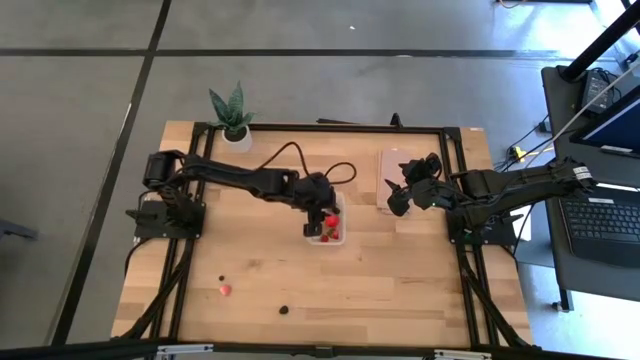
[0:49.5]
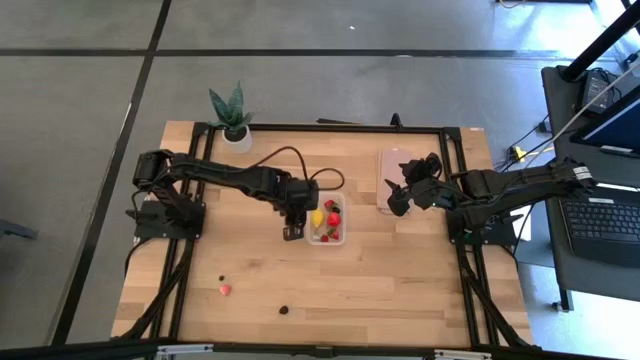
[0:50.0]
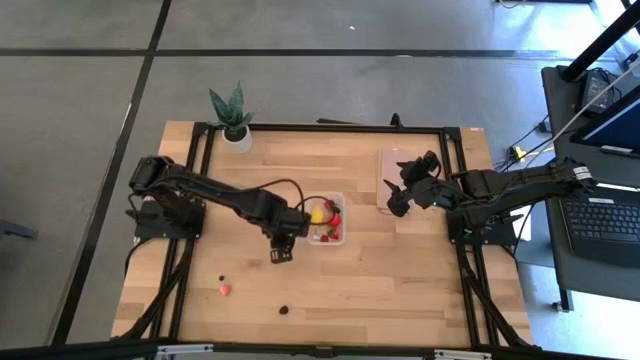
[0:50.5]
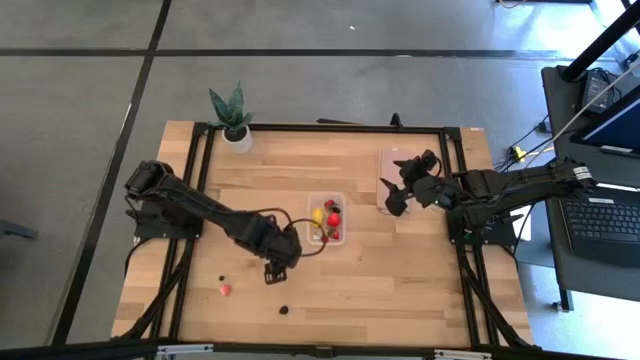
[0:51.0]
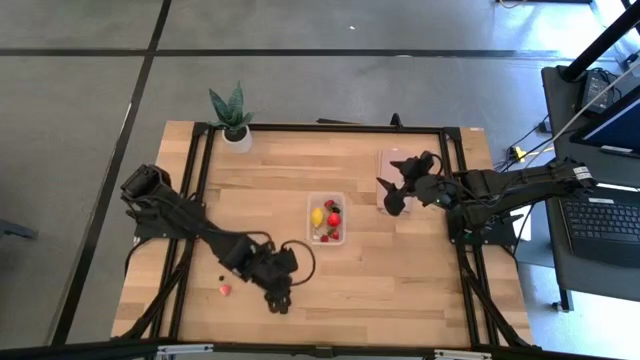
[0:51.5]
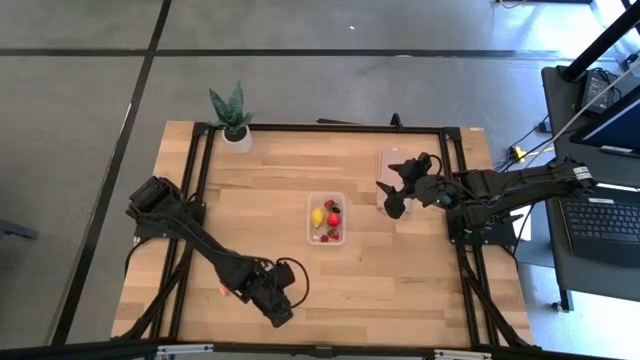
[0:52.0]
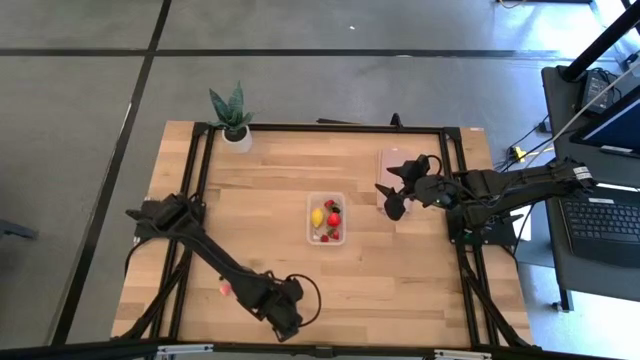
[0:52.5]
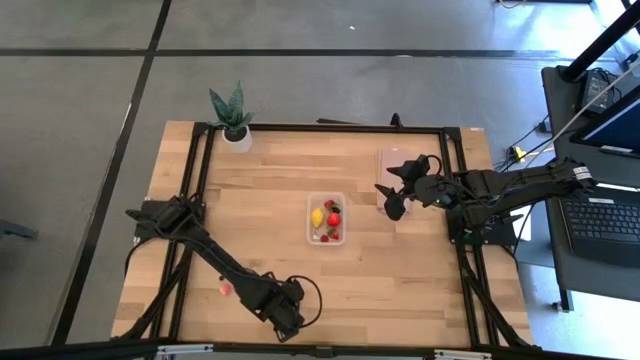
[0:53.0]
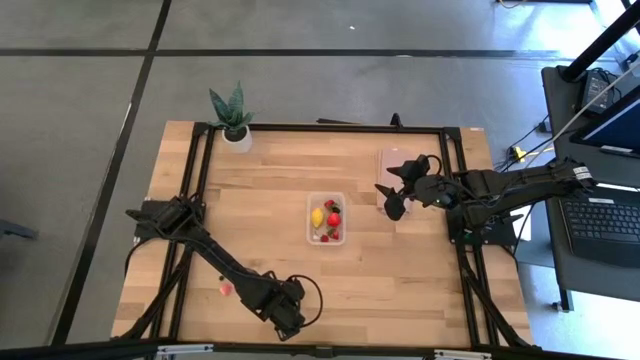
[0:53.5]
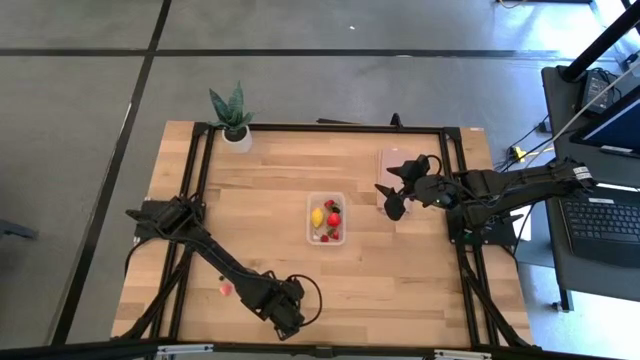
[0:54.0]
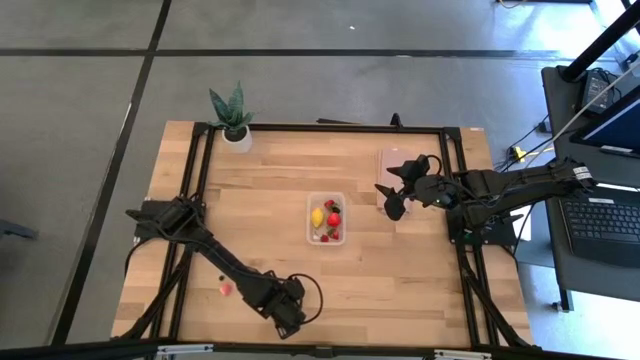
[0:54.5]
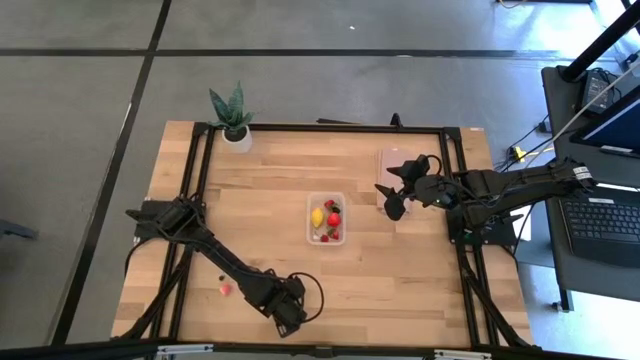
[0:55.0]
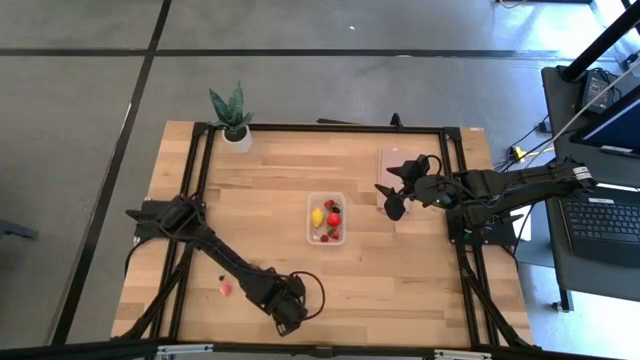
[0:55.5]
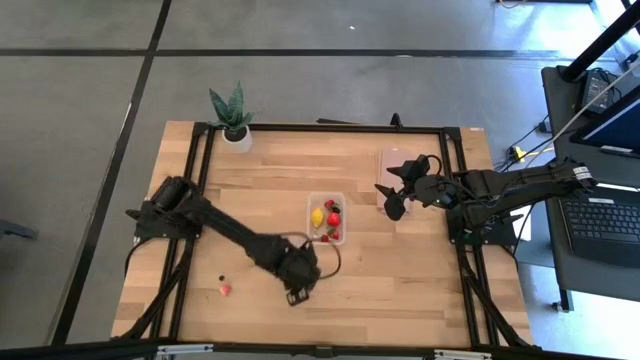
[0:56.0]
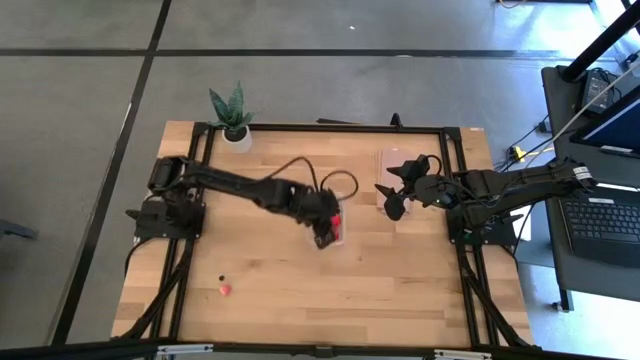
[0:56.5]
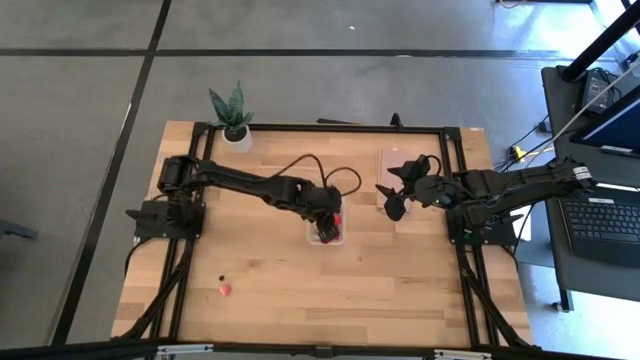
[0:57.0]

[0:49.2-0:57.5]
Task: Pick and placing Produce into tupperware
Put the black blackberry into the transparent bin

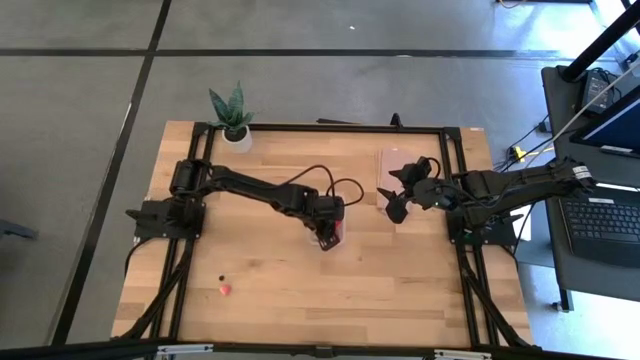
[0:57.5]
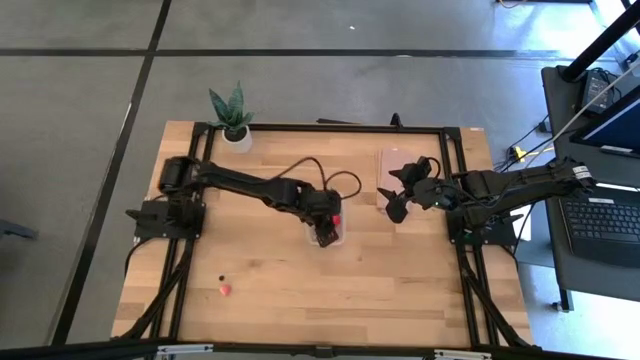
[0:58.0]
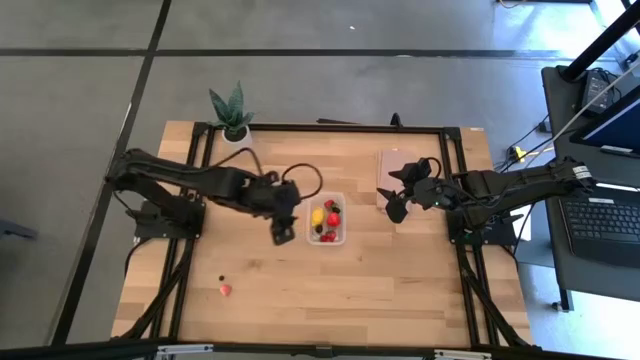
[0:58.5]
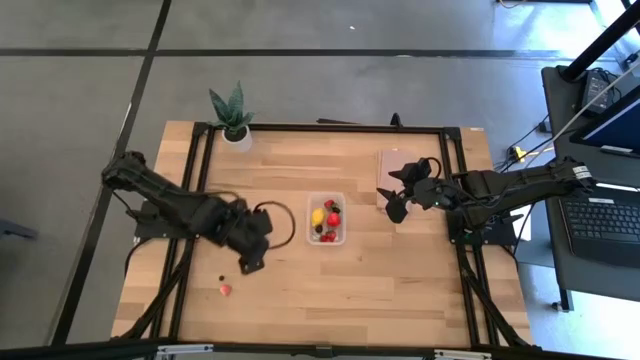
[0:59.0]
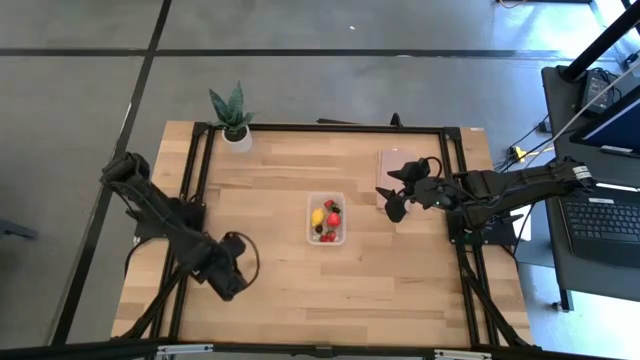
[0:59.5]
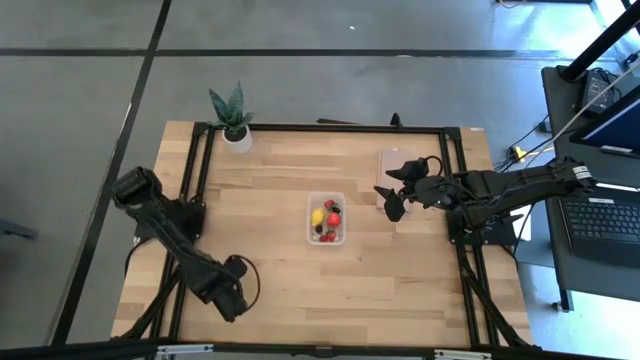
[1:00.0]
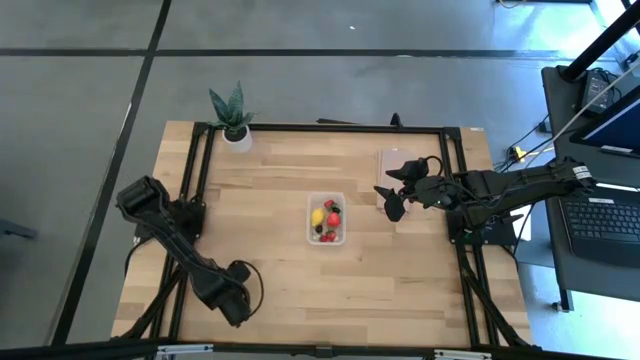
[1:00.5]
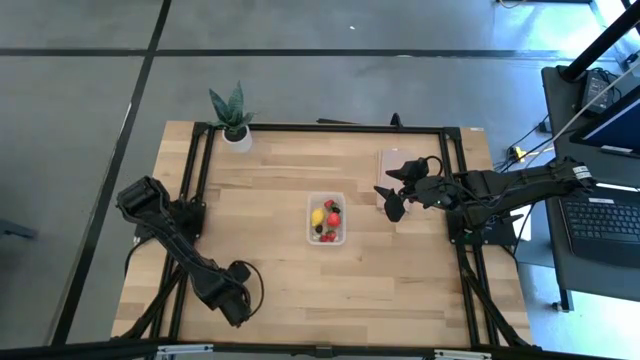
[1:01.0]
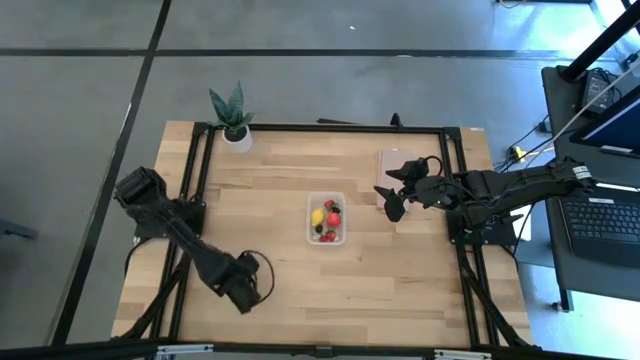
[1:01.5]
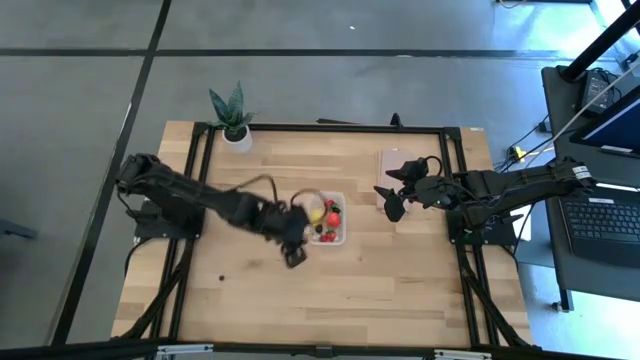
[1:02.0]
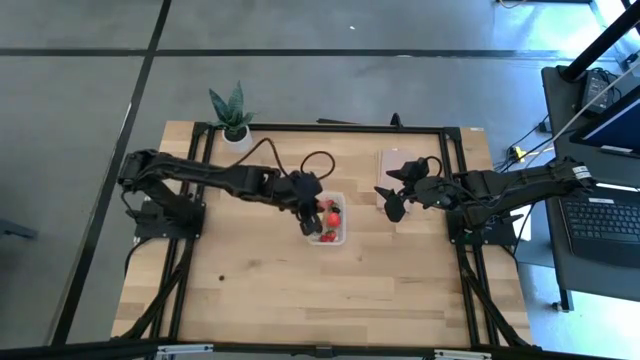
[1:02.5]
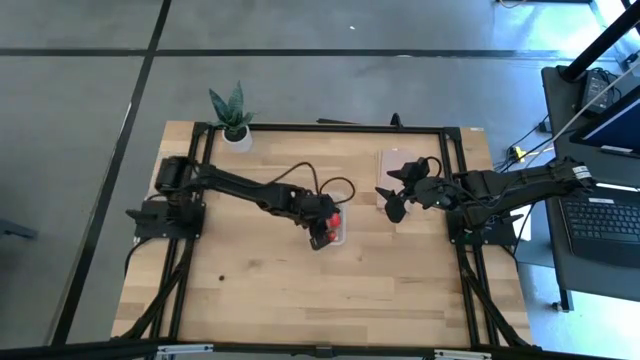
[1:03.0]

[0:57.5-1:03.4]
Put the pink peach into the transparent bin

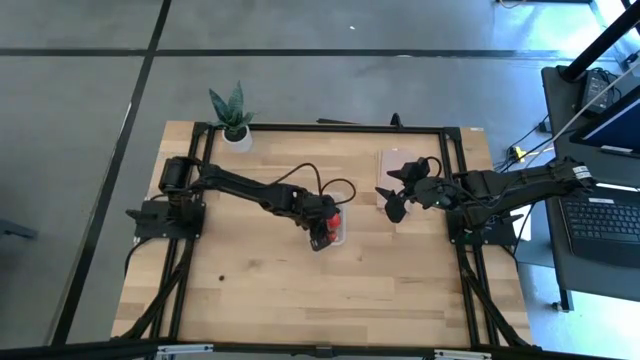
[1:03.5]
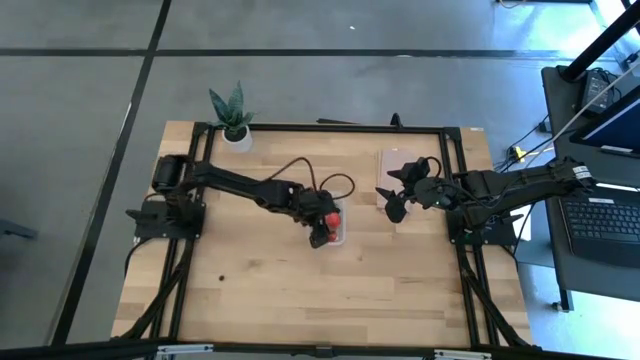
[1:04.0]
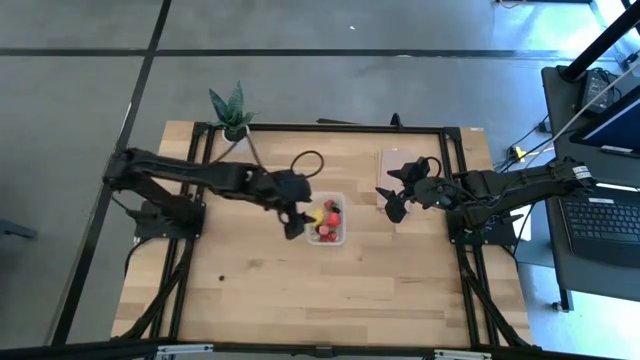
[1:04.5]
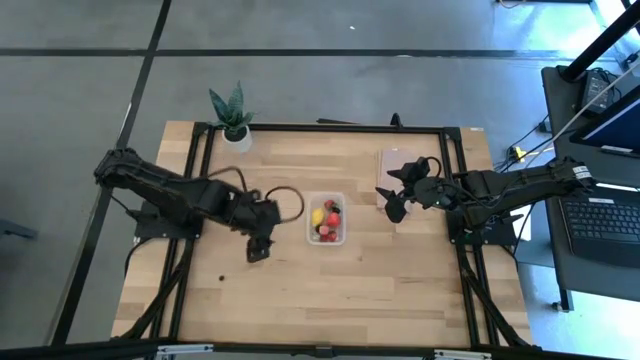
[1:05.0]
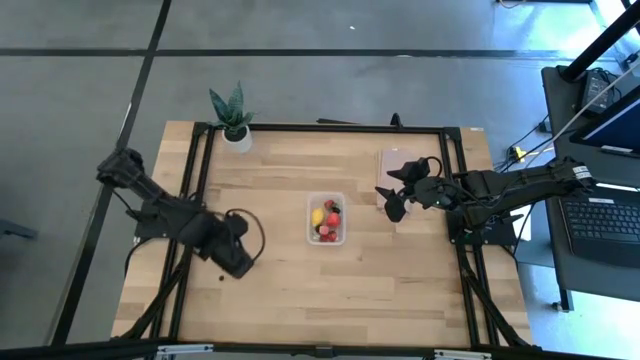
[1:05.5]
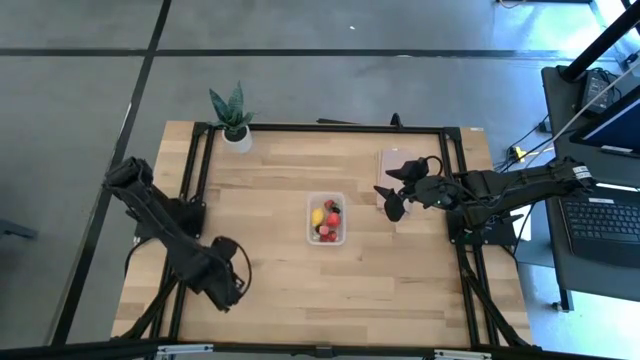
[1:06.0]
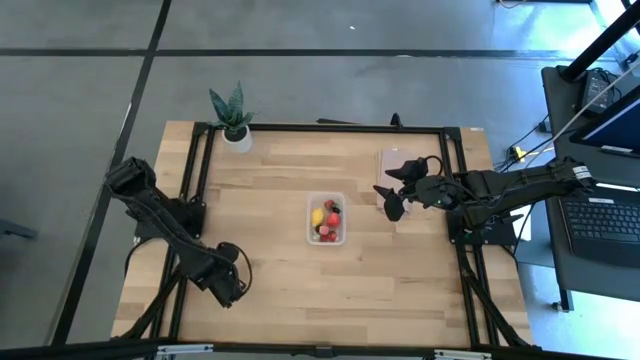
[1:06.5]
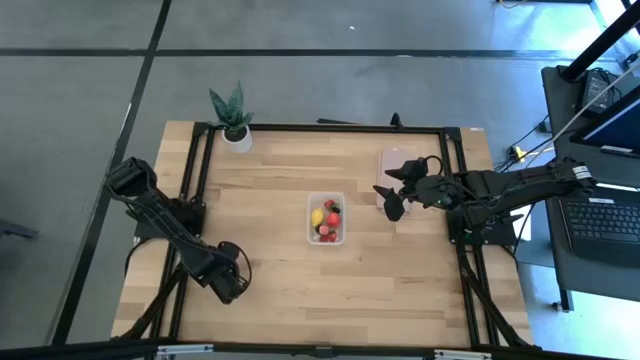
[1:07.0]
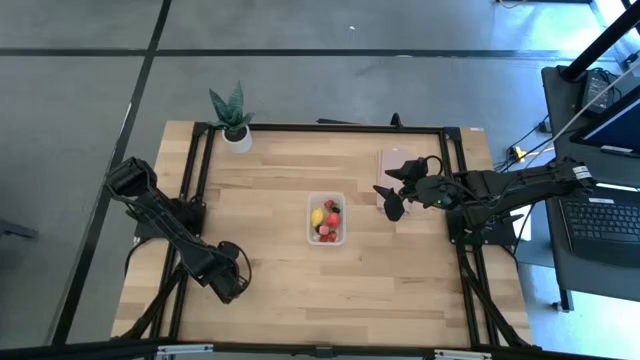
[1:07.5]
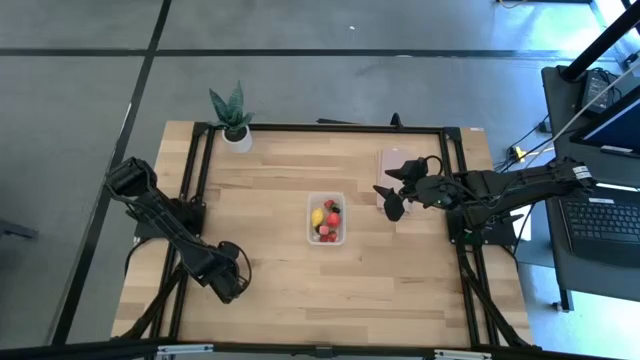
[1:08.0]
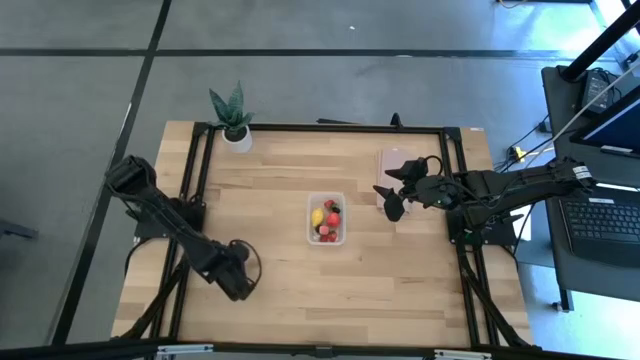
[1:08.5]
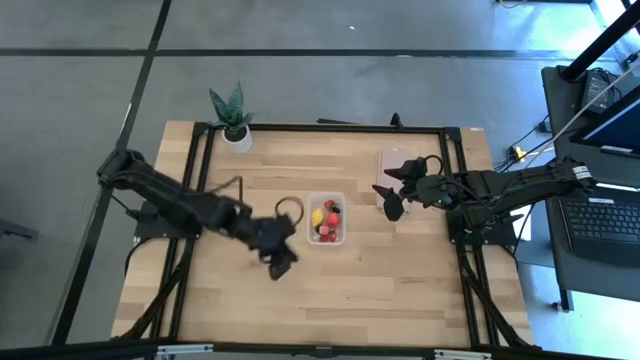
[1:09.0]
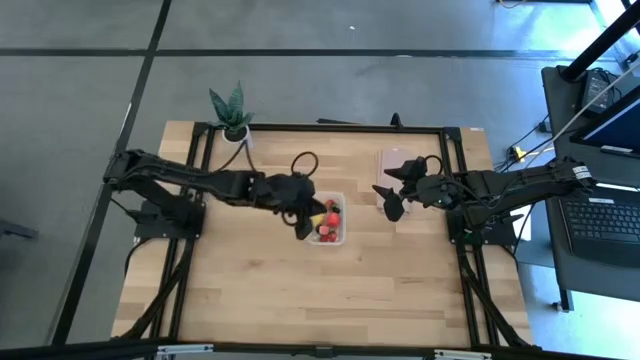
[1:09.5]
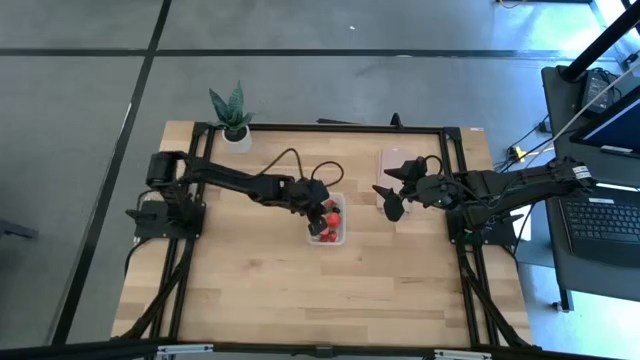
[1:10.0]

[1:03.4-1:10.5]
Put the blue berry into the transparent bin
